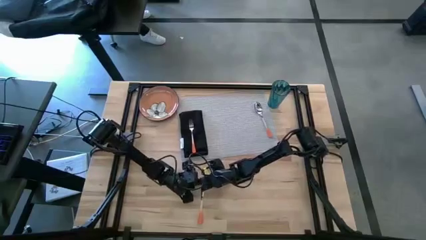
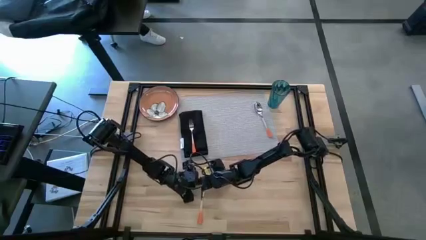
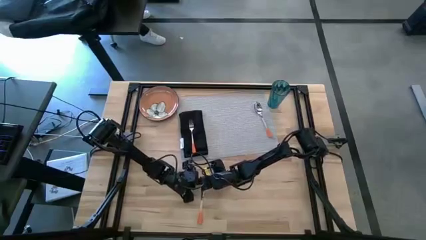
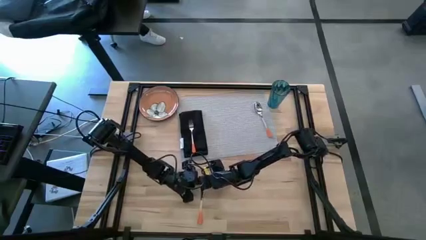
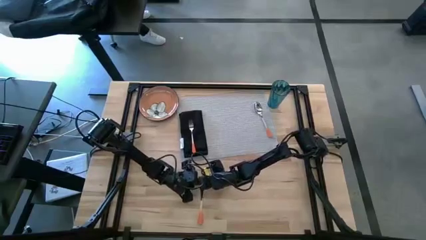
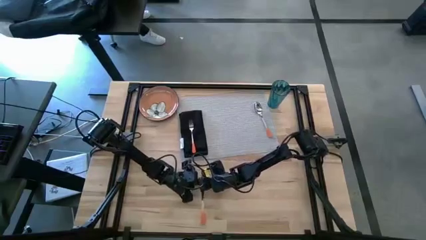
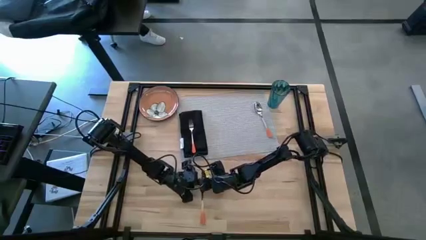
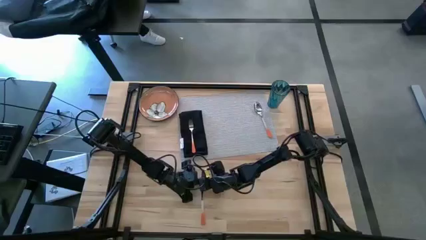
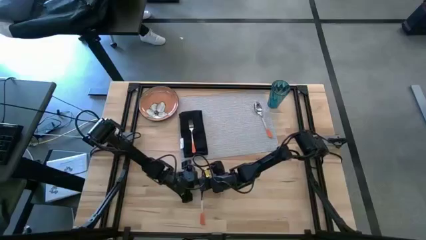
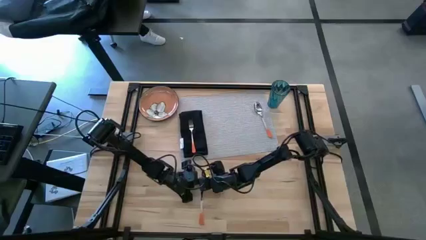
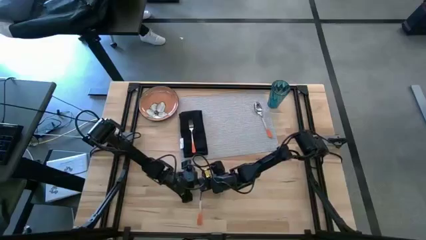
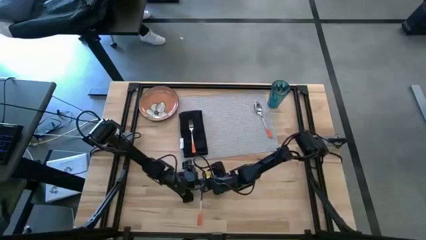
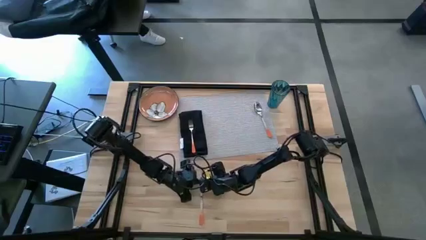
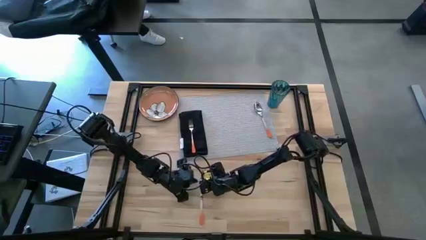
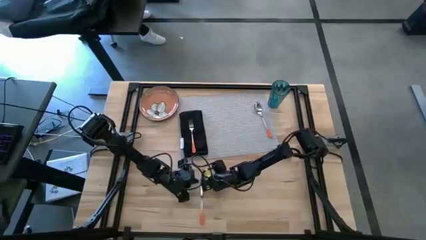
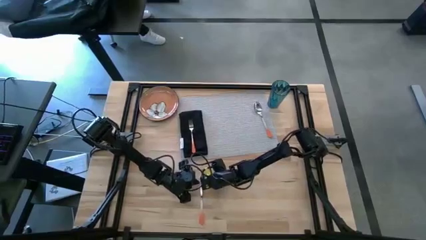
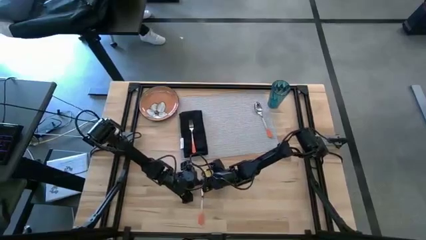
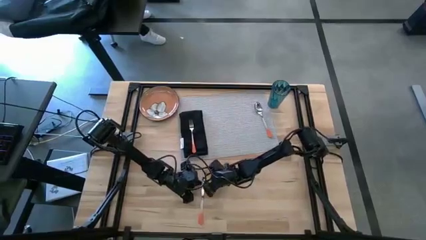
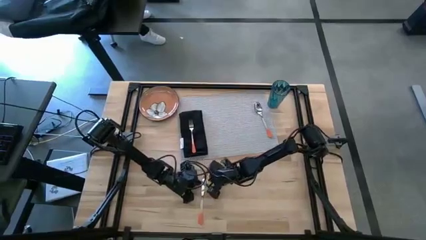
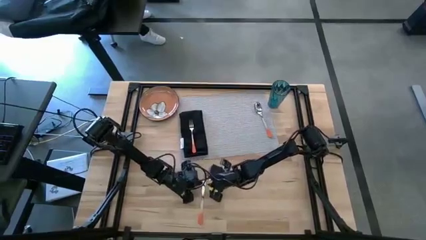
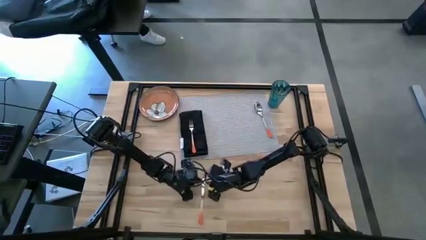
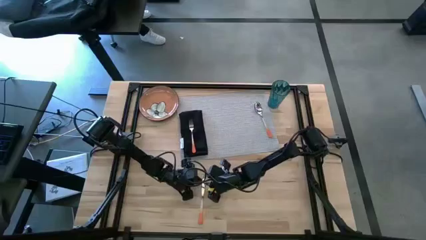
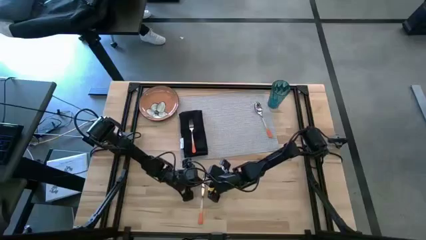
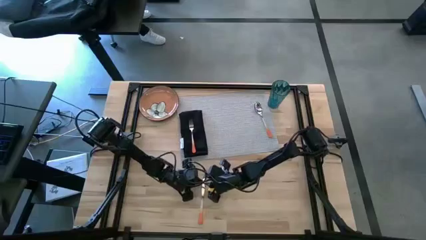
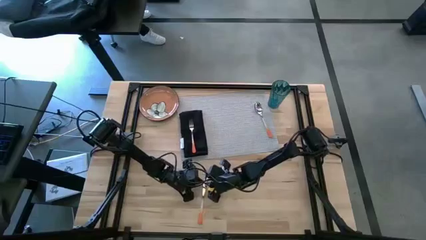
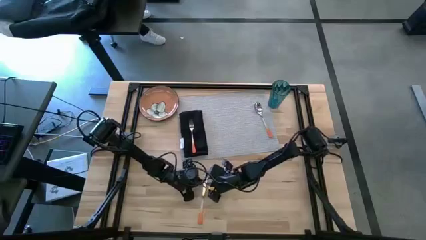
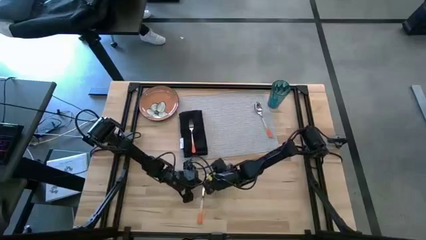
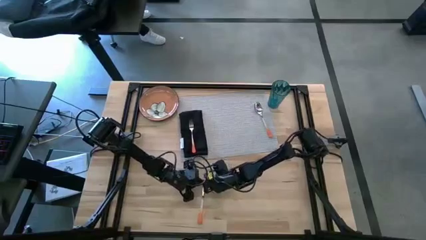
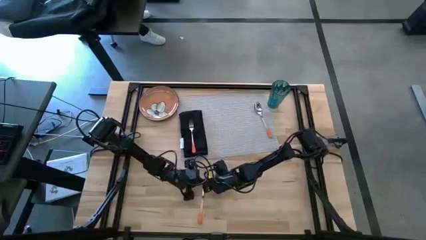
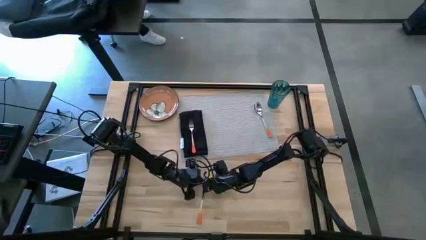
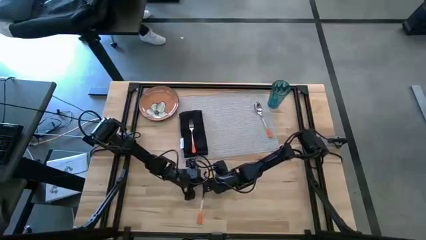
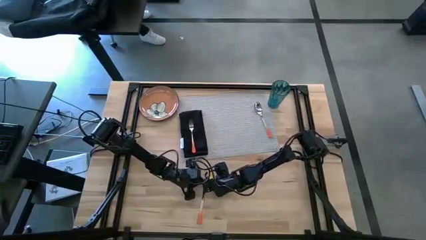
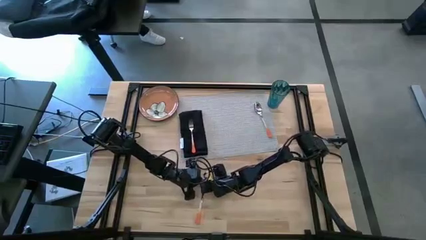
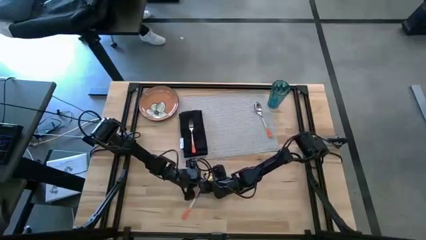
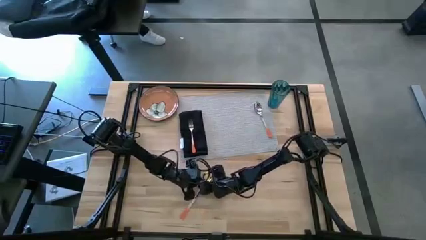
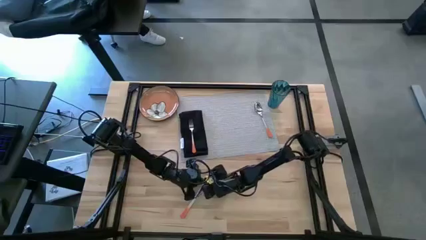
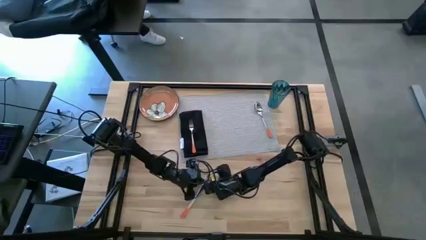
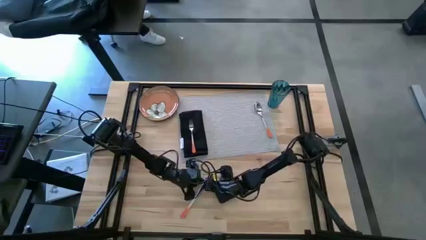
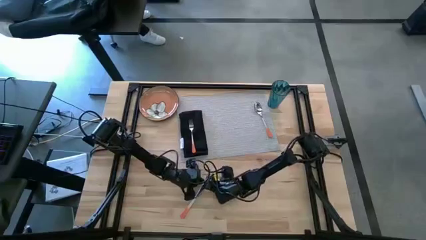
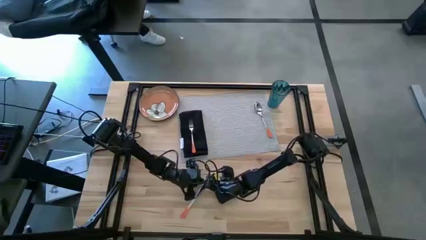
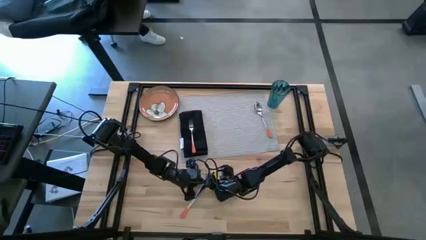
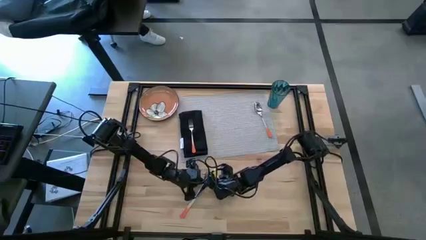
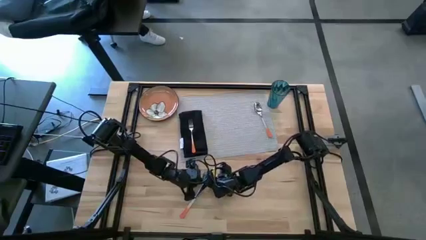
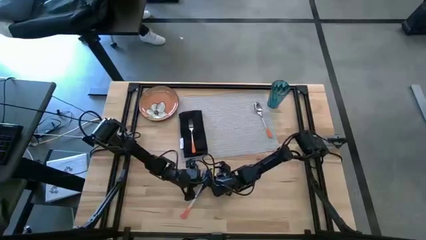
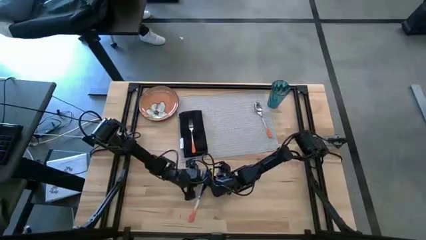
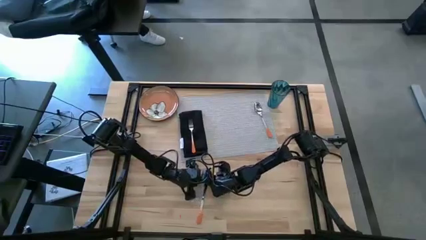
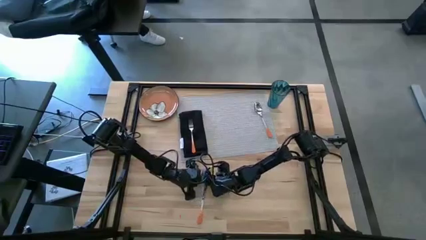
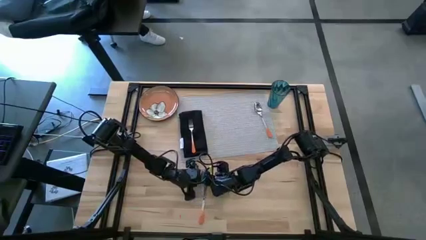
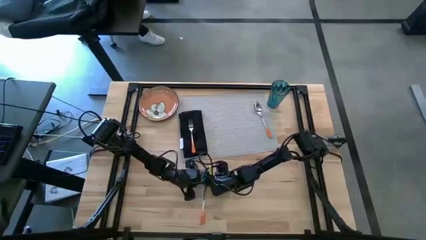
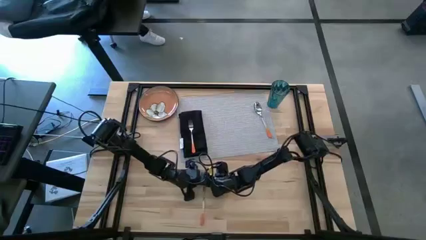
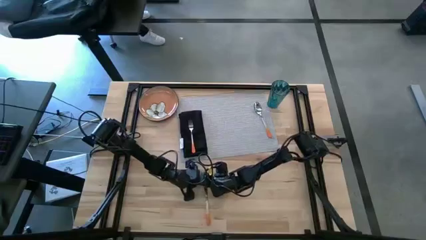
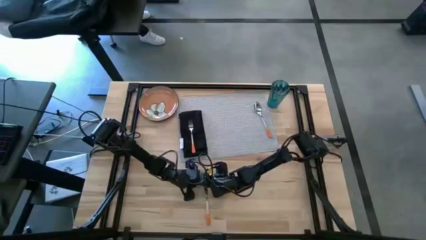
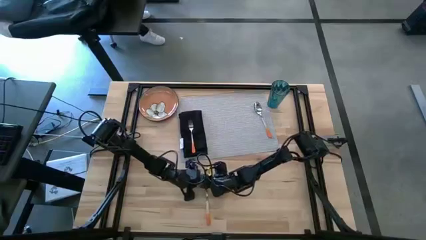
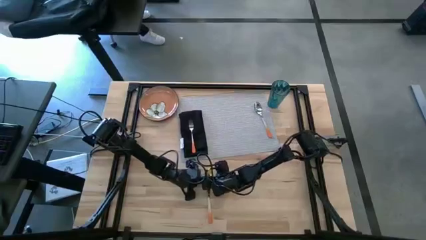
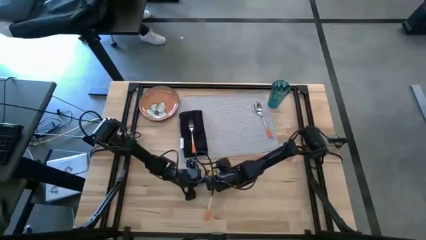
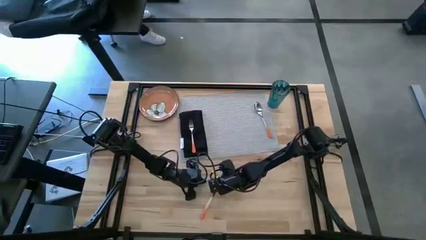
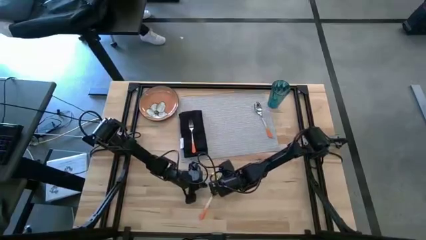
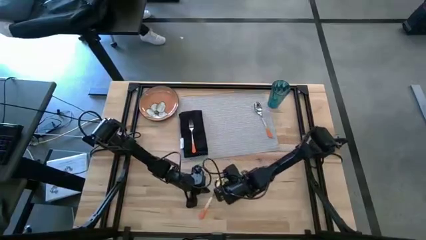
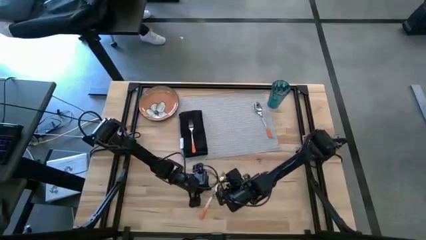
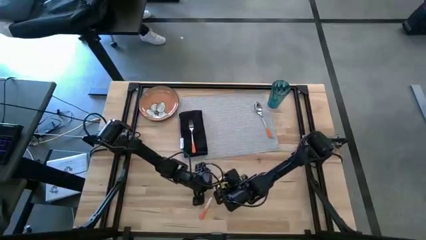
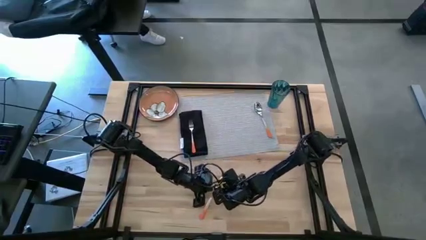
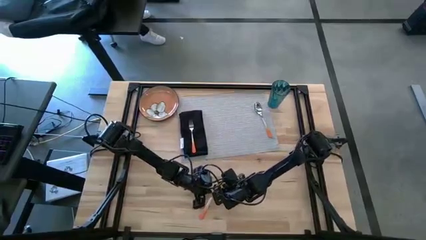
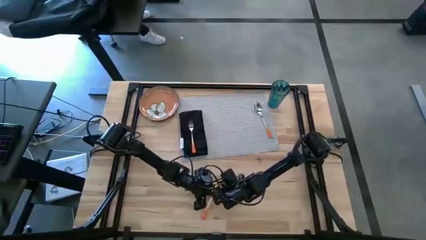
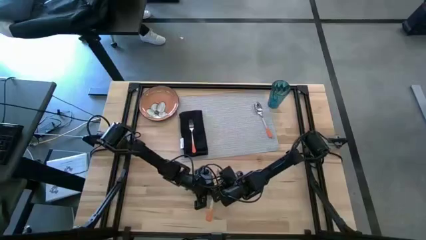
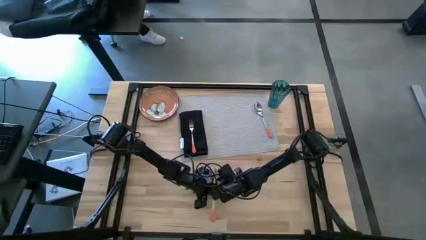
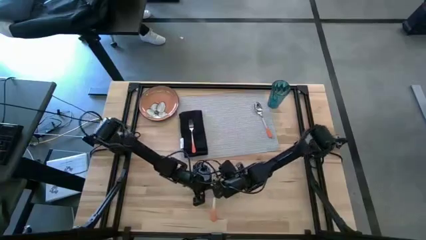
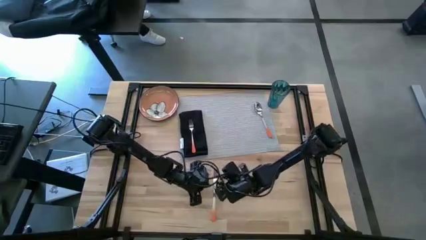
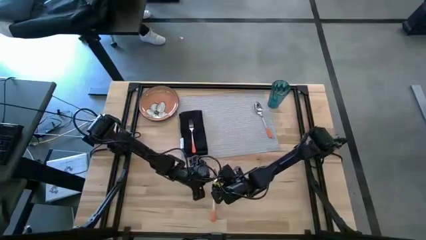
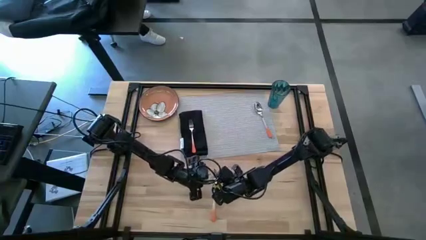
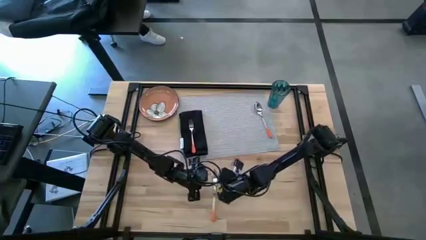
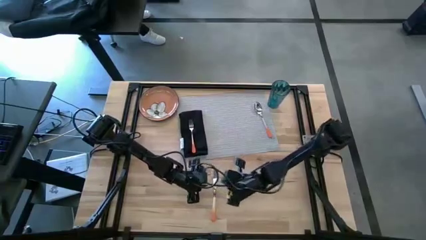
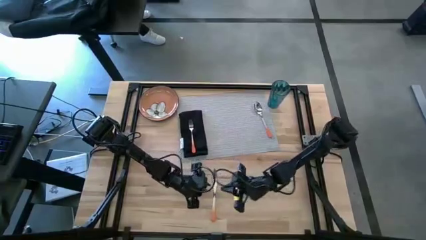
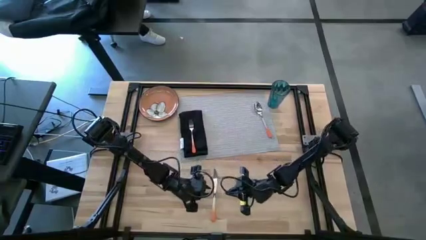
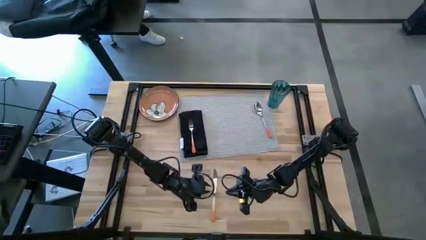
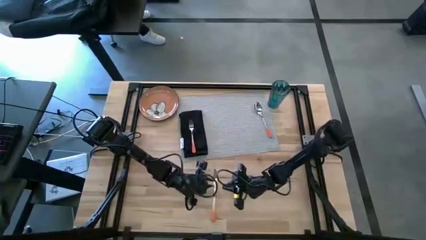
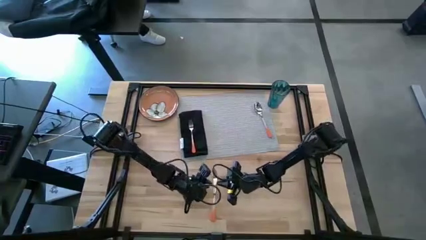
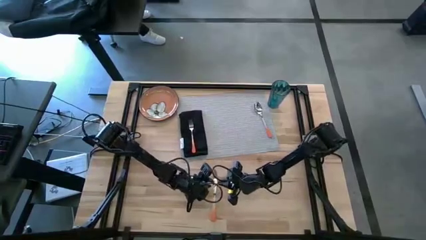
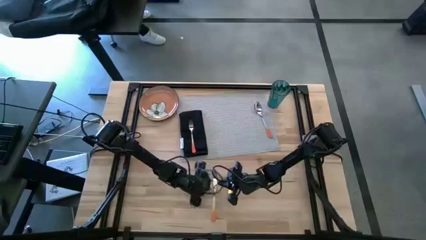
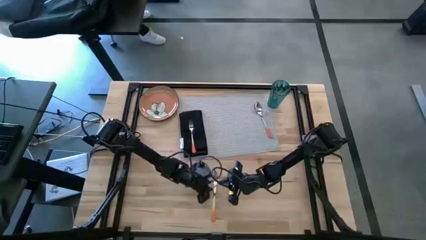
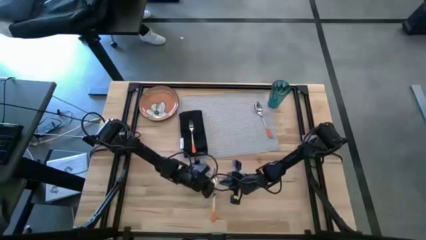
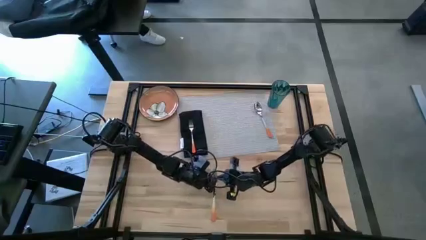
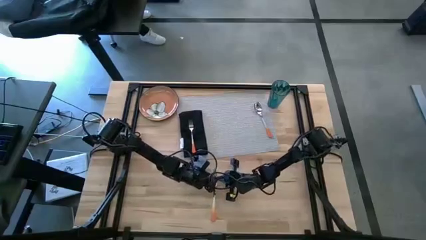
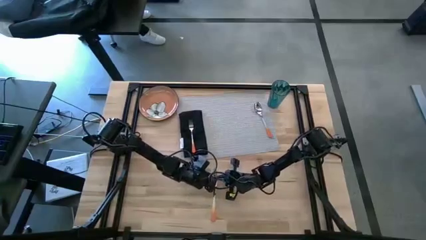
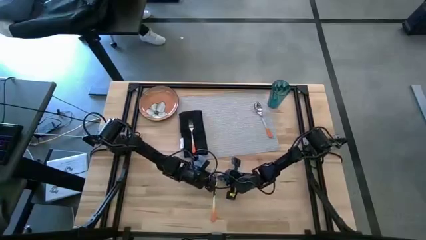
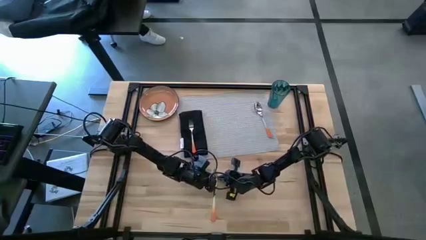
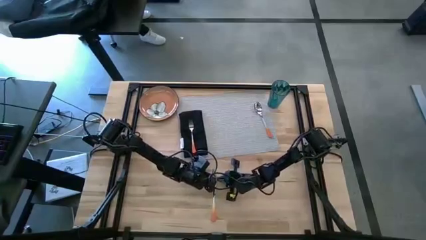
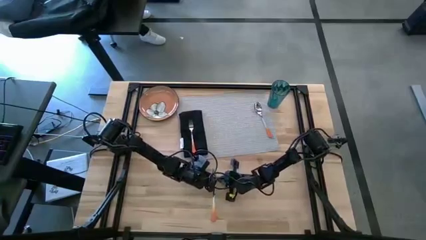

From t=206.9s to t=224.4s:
Task: Set table place
Put the orange table knife on the gray table mat beside the orange spoon
